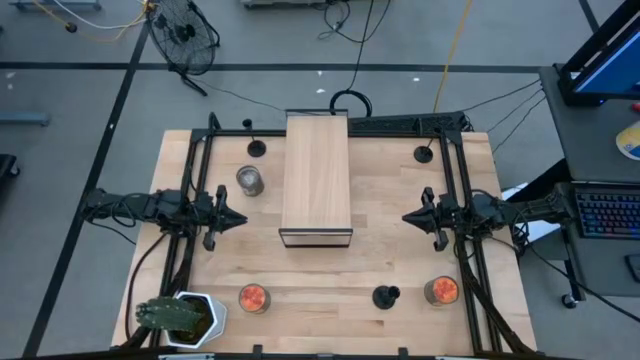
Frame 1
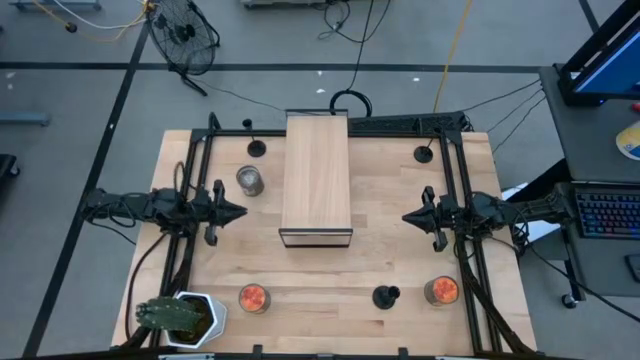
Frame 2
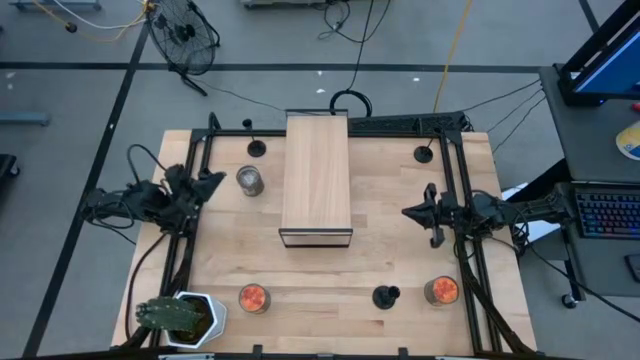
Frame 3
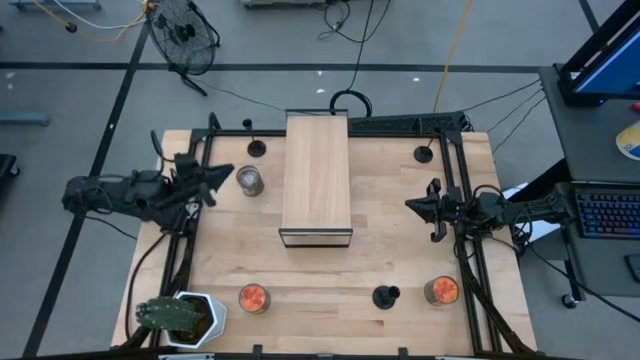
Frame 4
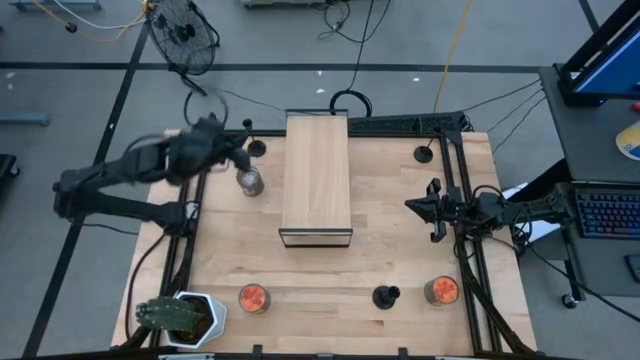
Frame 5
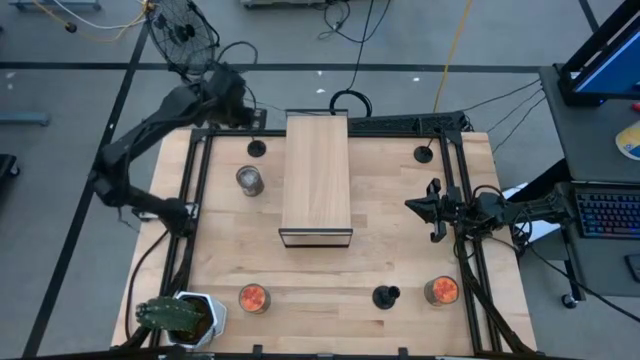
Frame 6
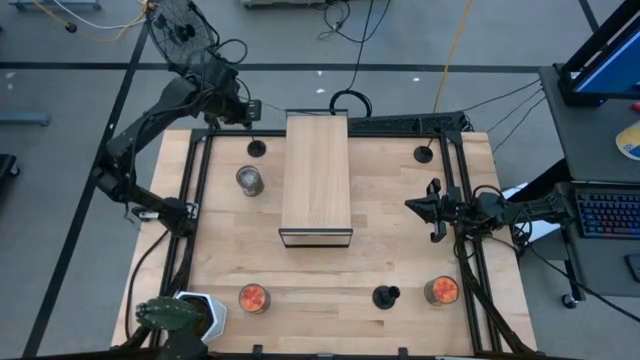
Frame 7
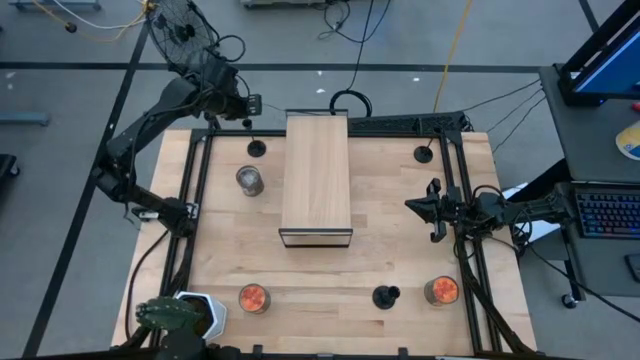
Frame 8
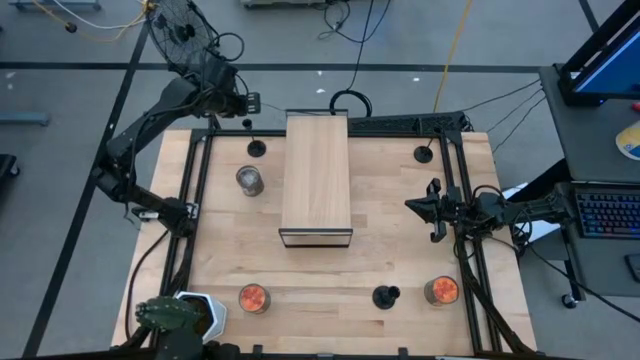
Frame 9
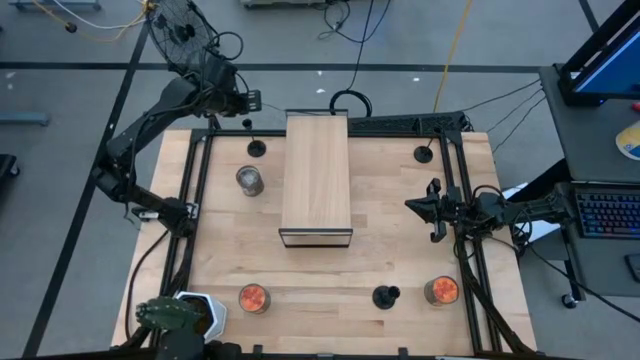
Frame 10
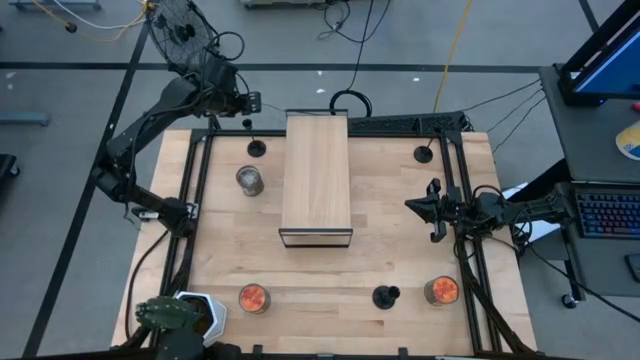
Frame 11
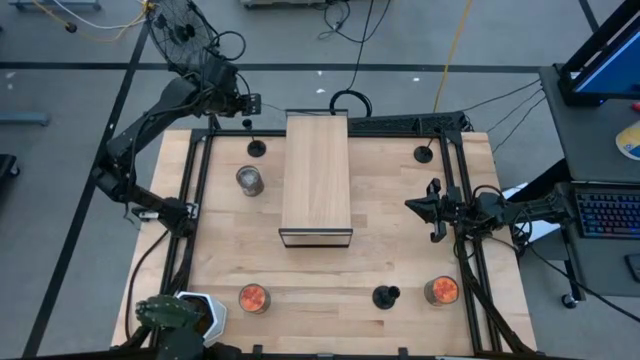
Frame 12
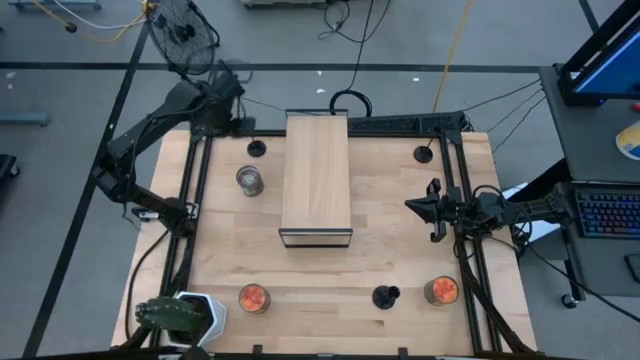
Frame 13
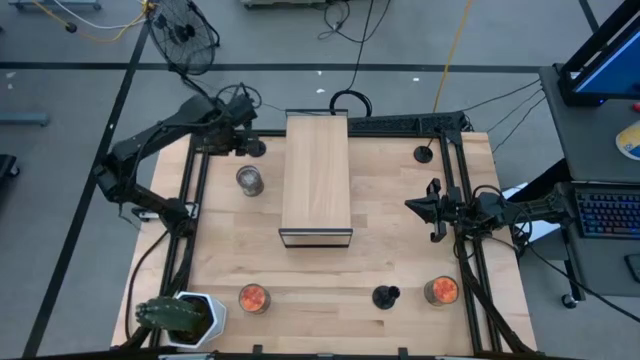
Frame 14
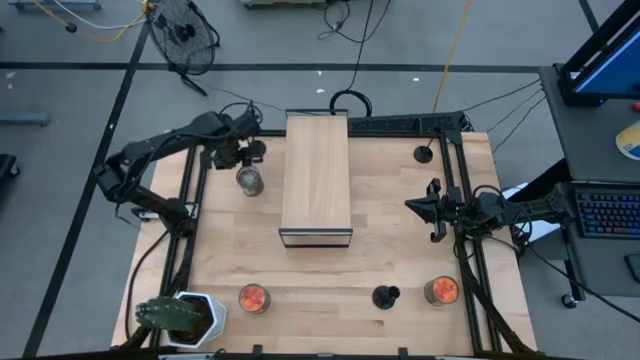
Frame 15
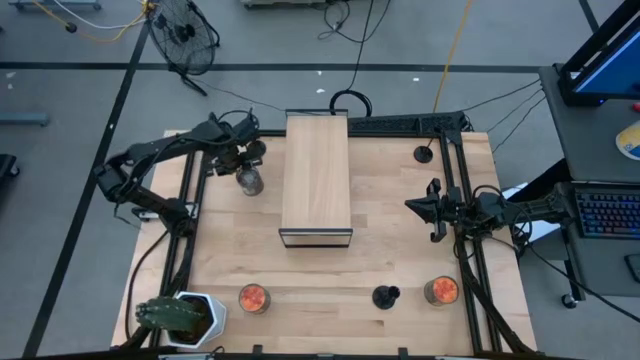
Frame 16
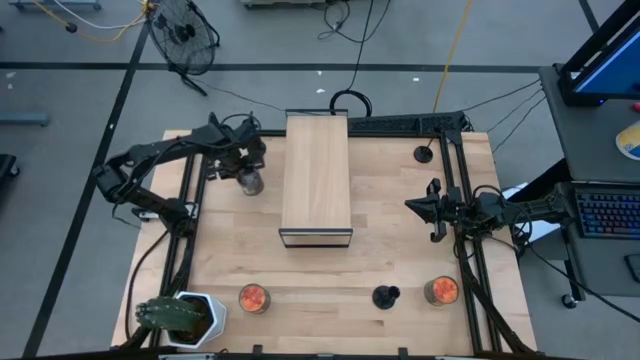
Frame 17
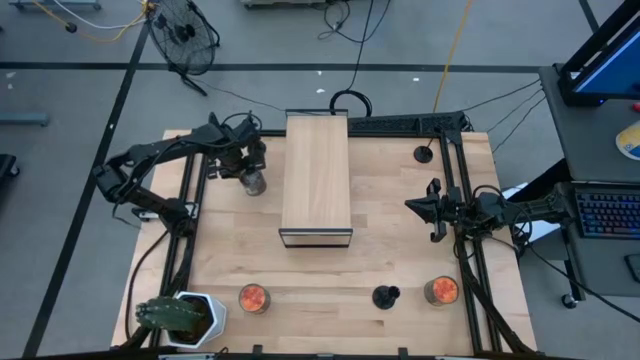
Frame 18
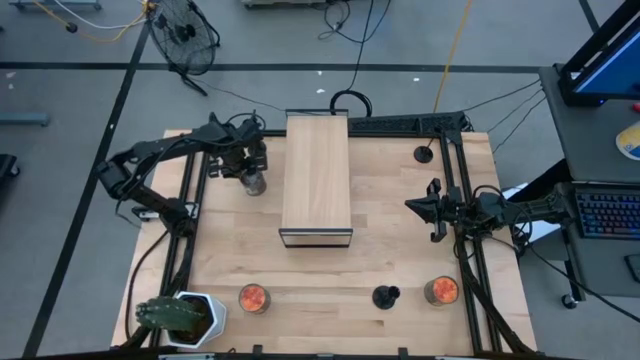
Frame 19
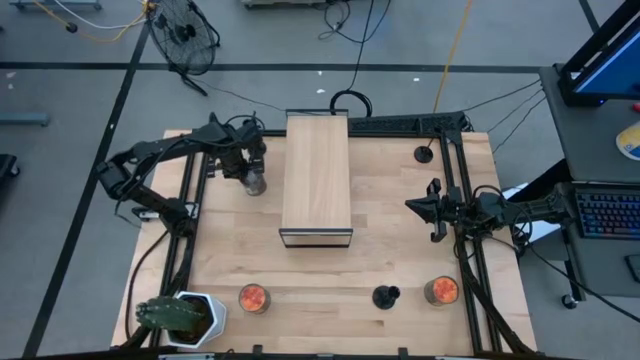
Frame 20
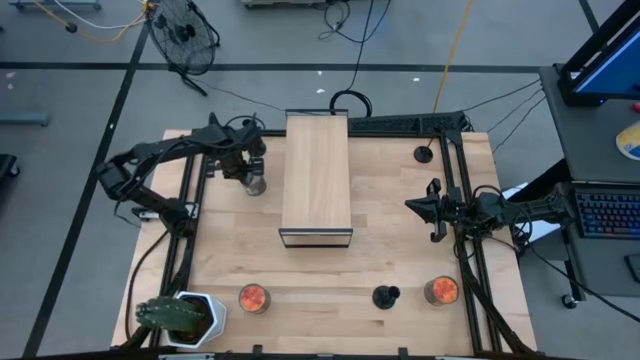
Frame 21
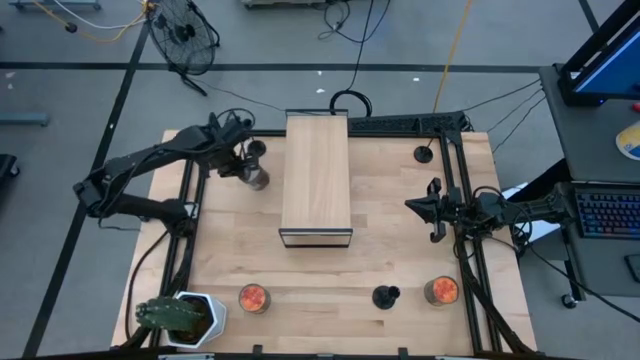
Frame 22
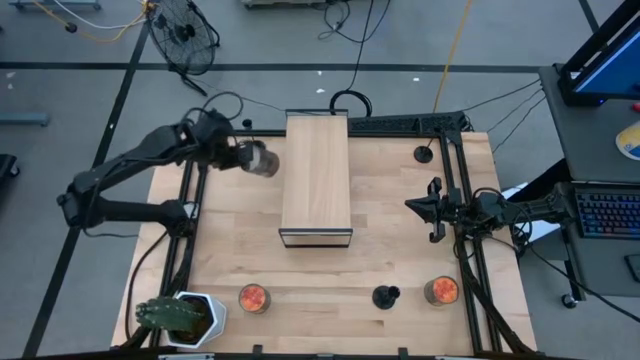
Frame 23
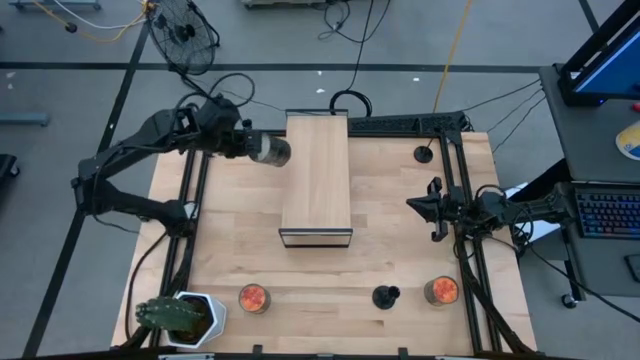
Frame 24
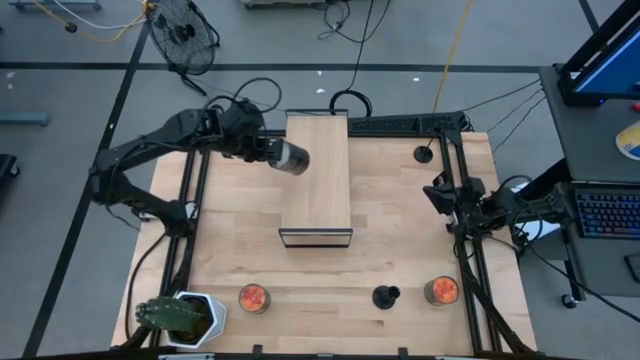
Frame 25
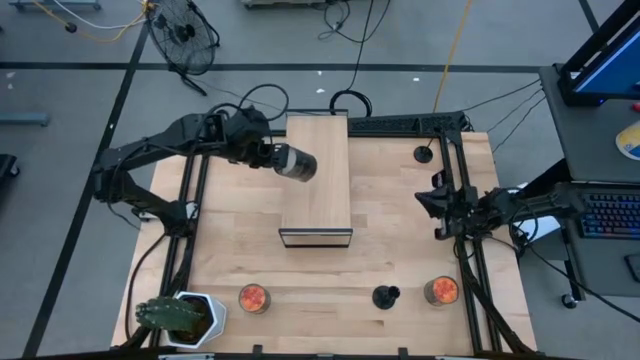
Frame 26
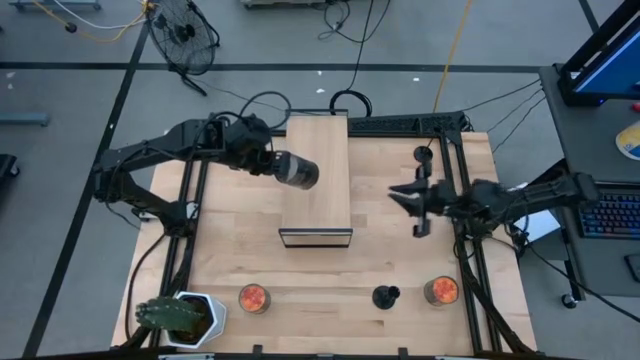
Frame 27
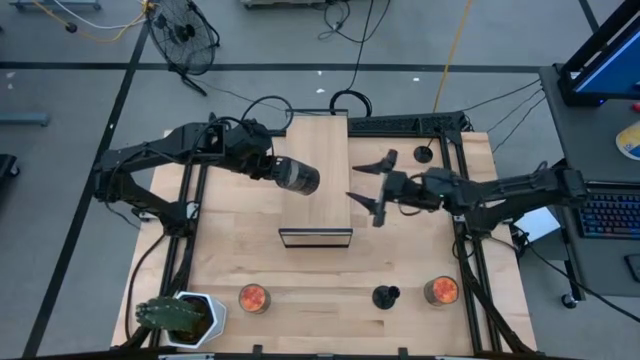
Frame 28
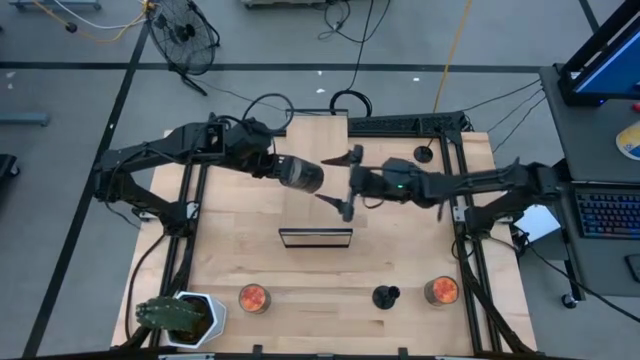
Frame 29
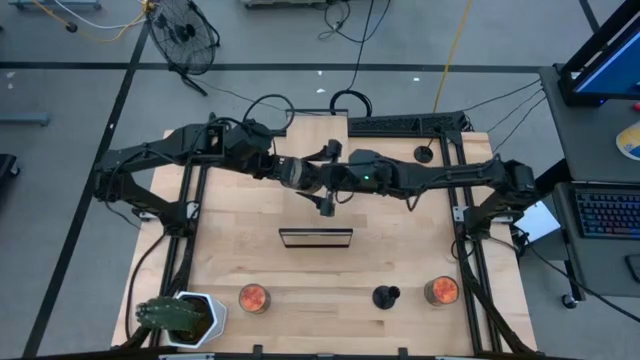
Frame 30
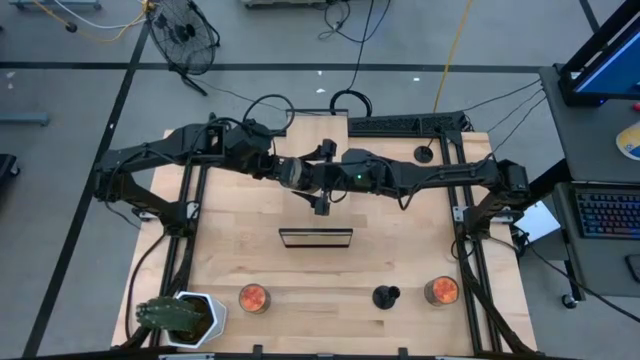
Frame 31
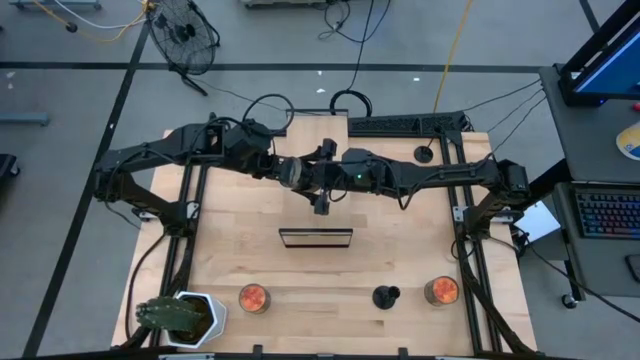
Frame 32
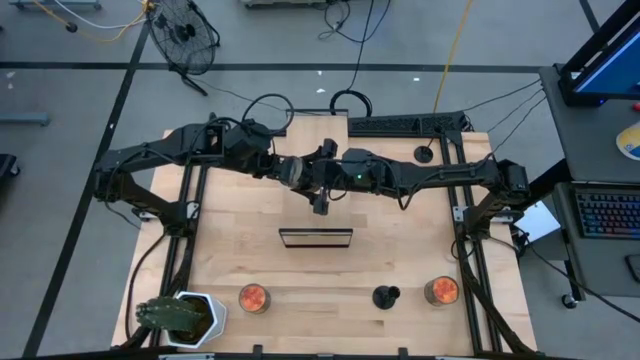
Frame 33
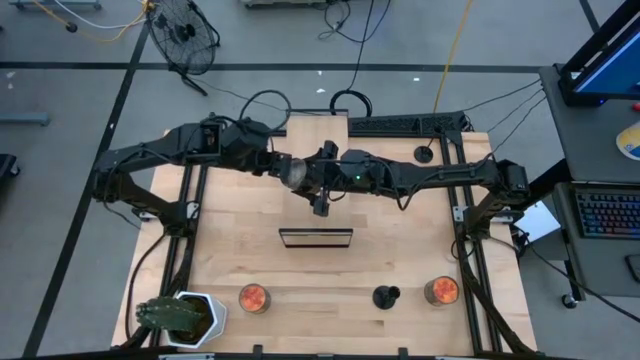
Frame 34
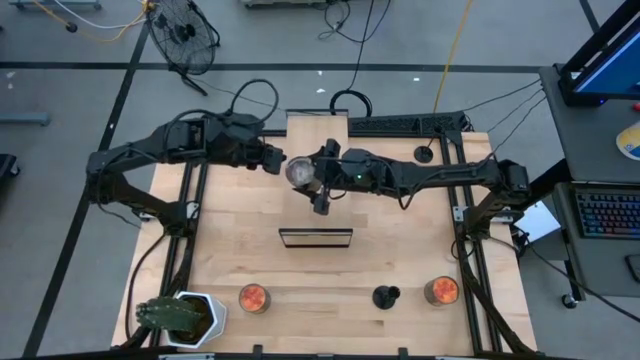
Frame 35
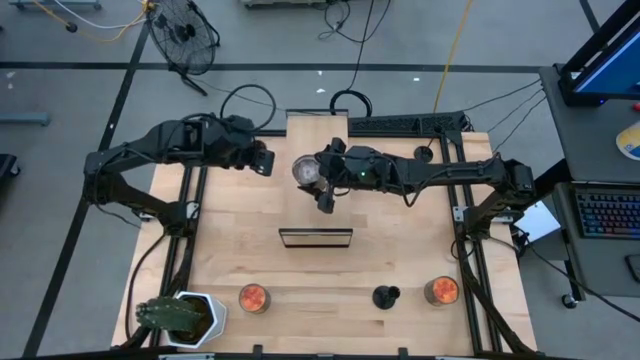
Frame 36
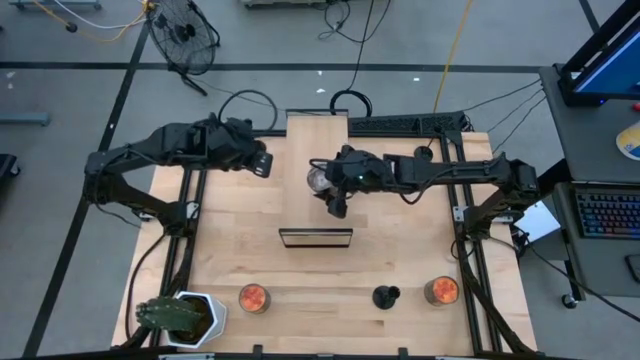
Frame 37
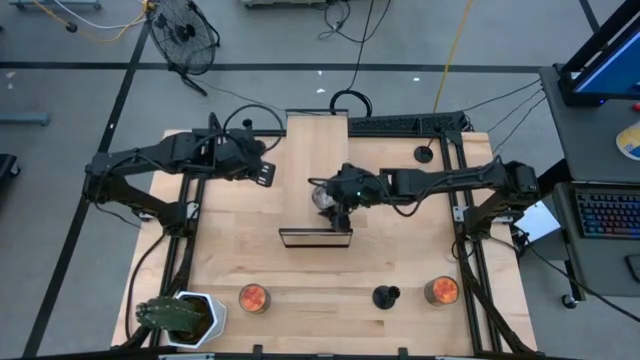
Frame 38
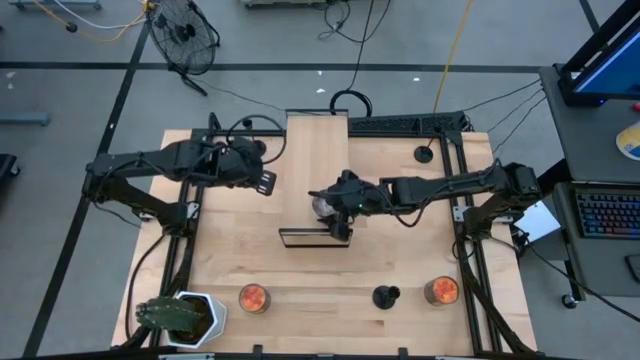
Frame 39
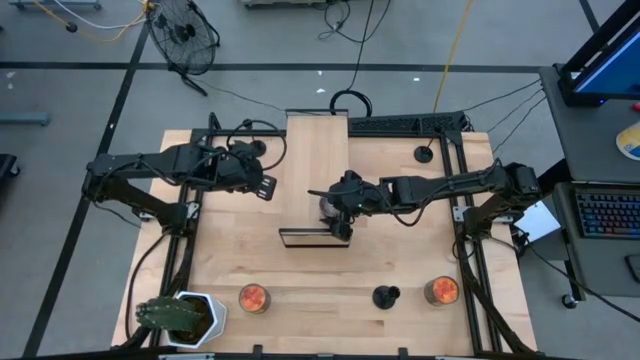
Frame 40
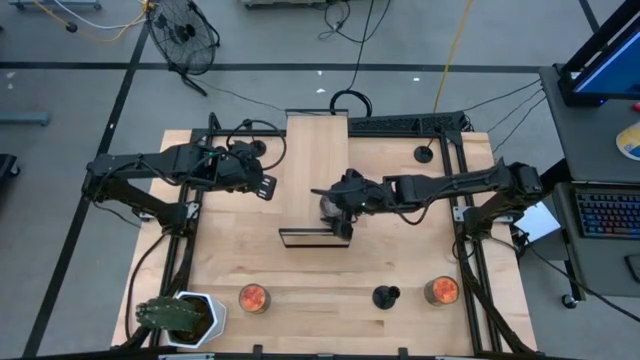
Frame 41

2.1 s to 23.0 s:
Task: Pick & Place candle stick holders
Put the brown scented candle on the shelf
